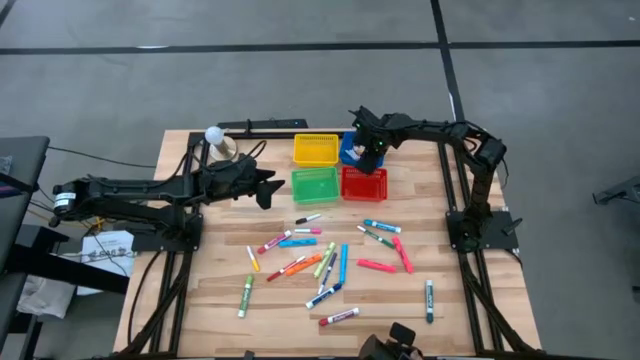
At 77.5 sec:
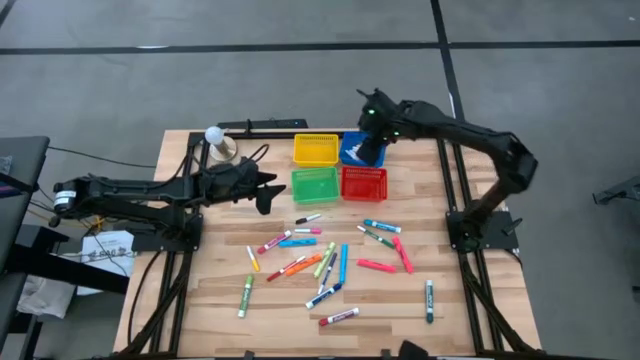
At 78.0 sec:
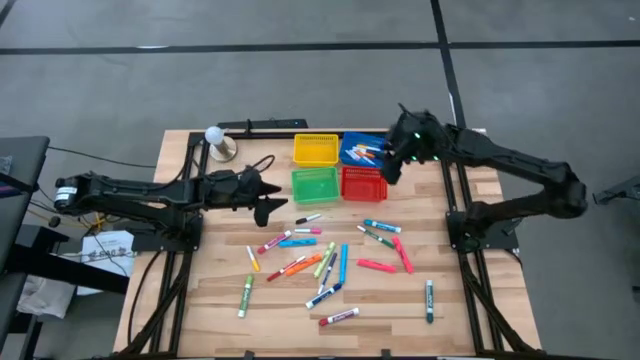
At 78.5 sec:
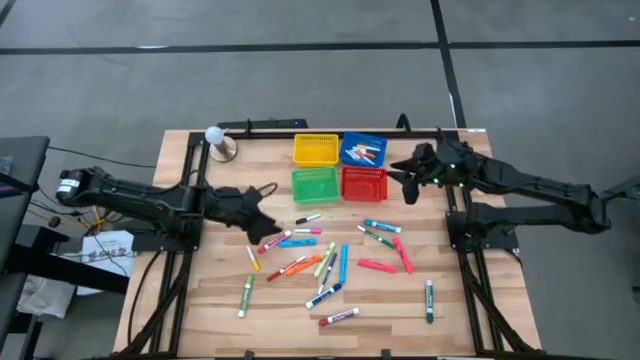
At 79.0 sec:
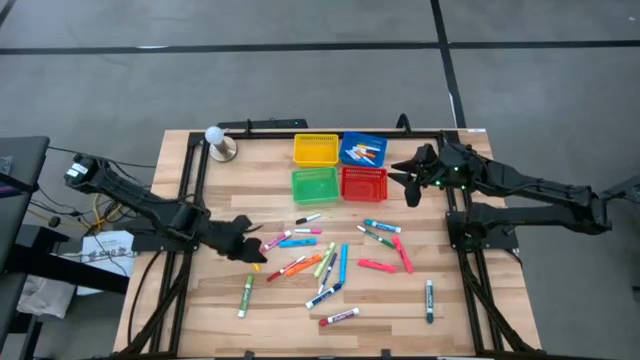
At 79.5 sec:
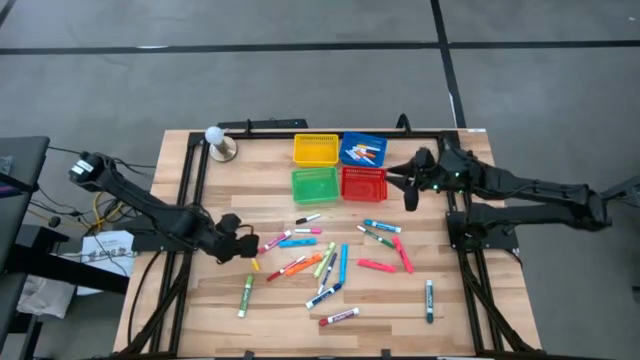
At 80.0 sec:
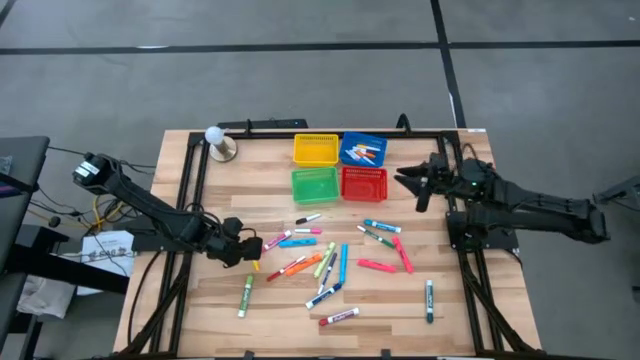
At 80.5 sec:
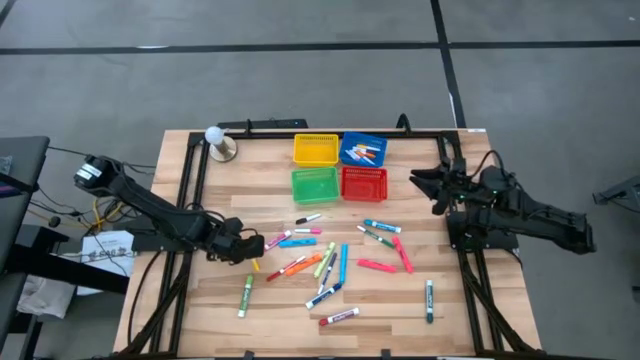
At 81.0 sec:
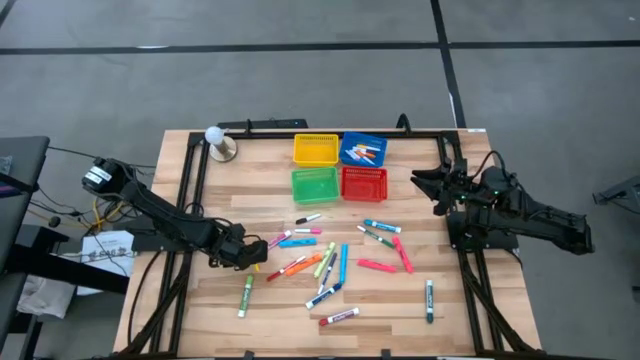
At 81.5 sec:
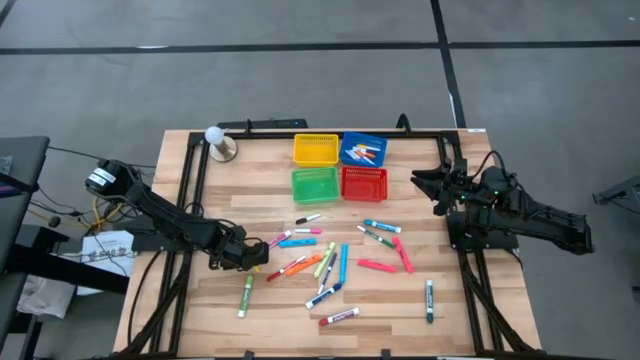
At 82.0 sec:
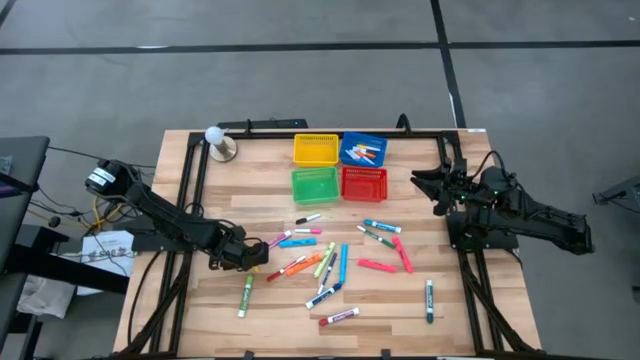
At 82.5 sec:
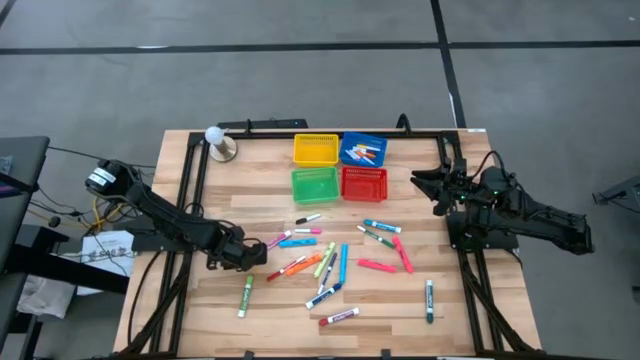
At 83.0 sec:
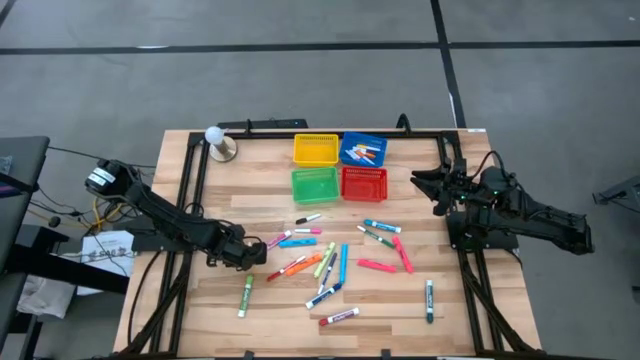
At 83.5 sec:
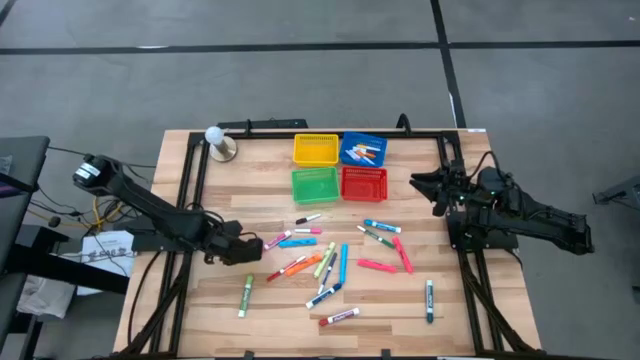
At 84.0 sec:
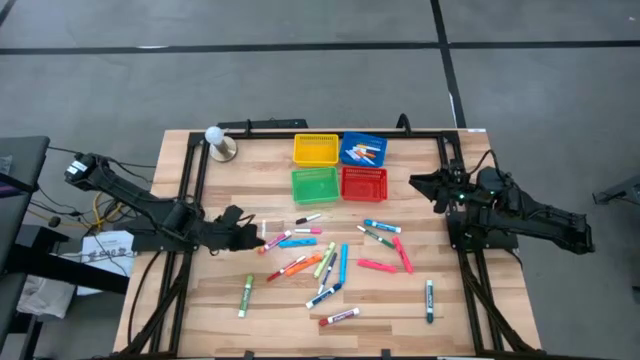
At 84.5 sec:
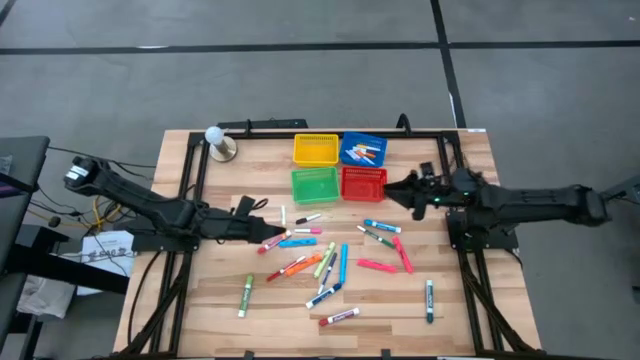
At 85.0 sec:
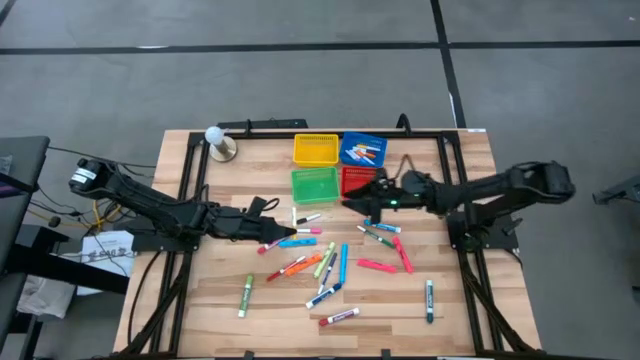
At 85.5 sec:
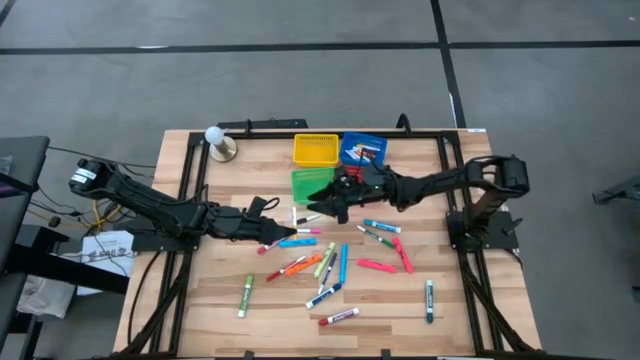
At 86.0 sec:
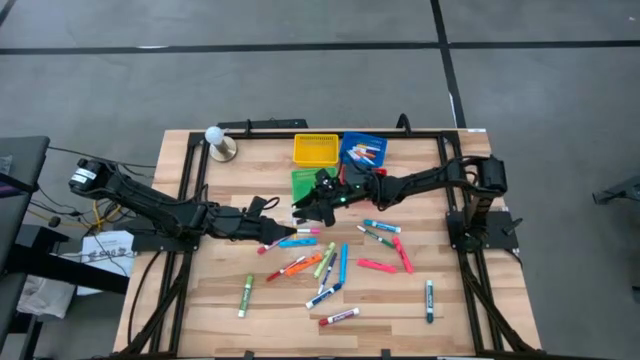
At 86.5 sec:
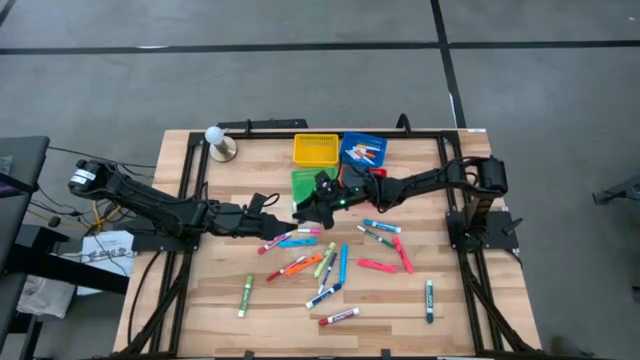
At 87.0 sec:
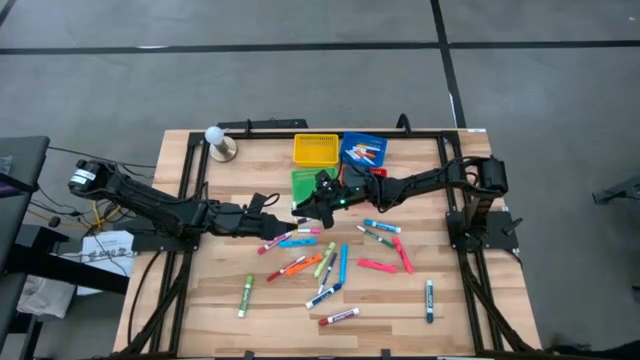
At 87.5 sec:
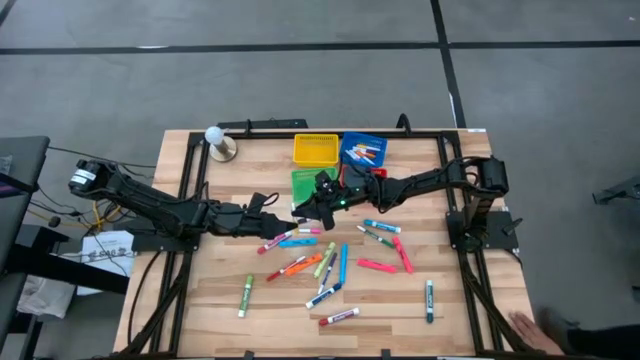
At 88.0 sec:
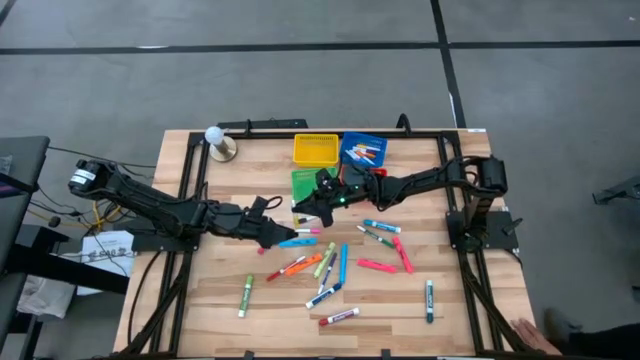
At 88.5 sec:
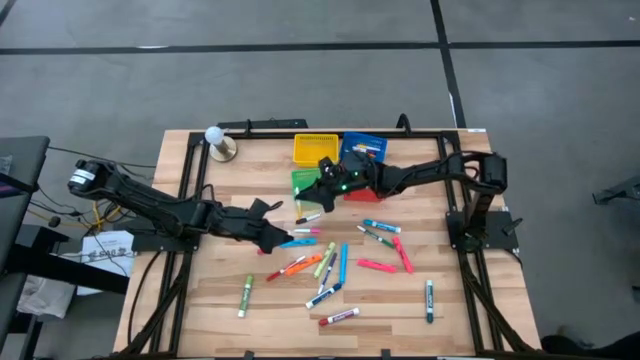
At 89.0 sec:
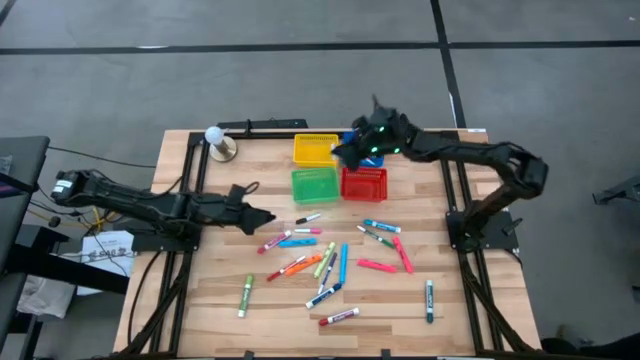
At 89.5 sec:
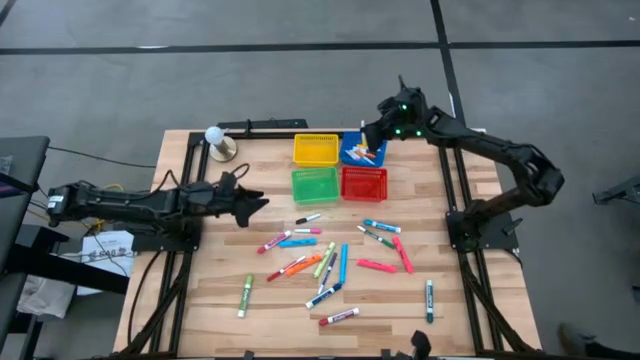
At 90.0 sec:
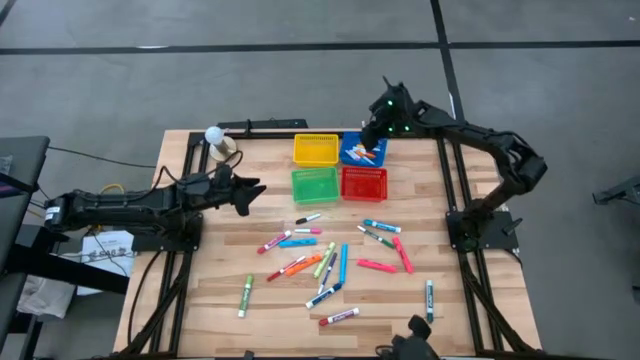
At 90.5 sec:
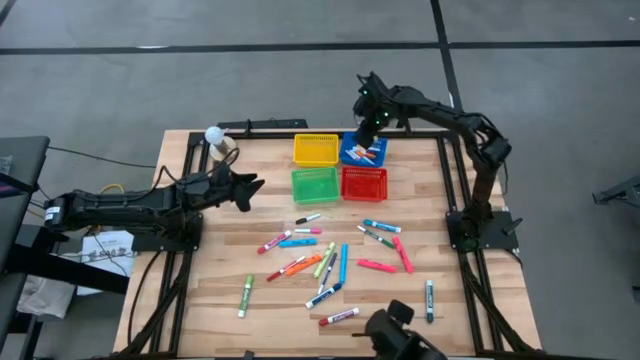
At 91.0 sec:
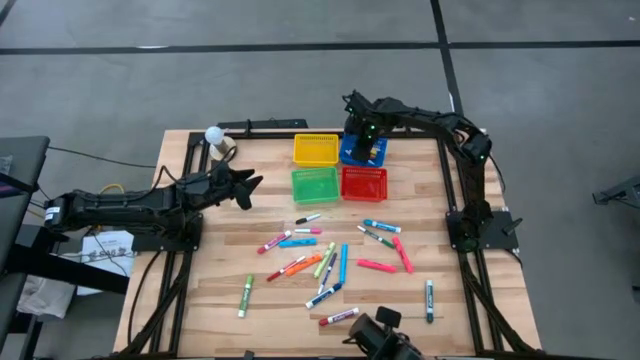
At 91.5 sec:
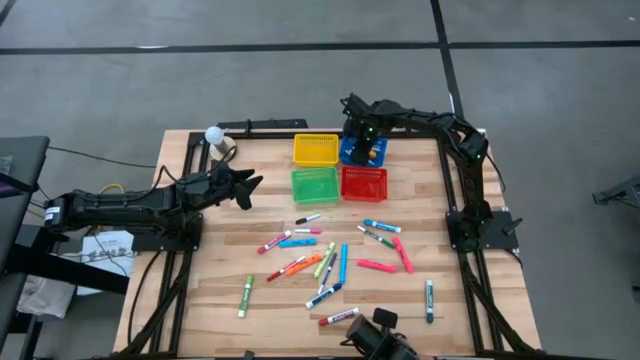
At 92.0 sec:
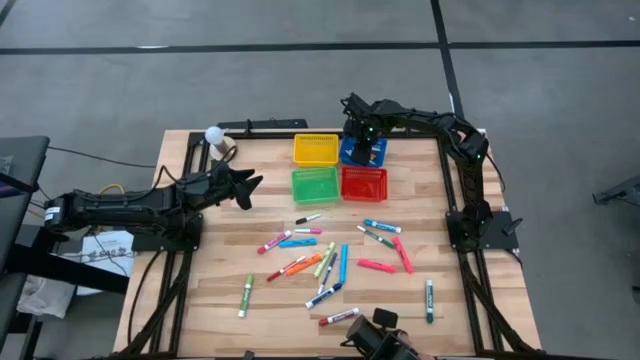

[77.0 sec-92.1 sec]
Task: Pick & Place Markers
Put the yellow mini marker into the blue bin

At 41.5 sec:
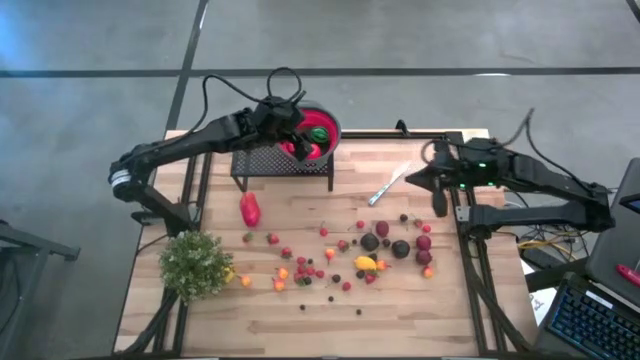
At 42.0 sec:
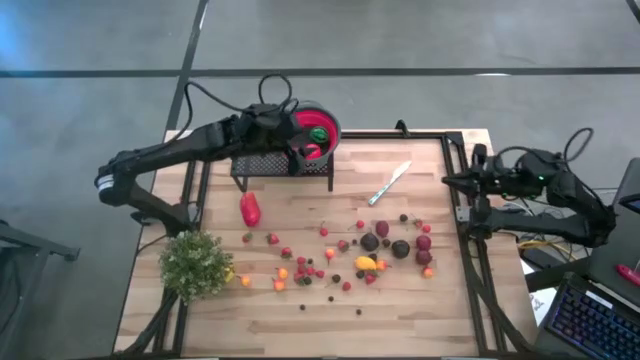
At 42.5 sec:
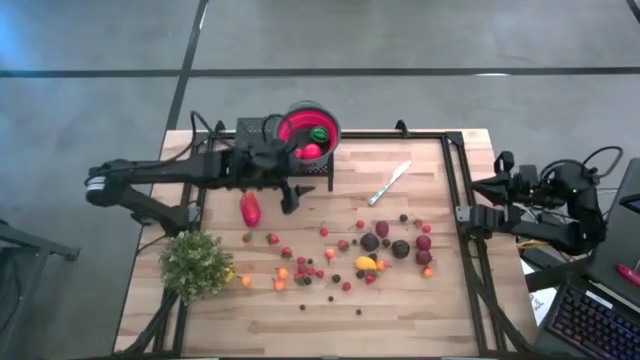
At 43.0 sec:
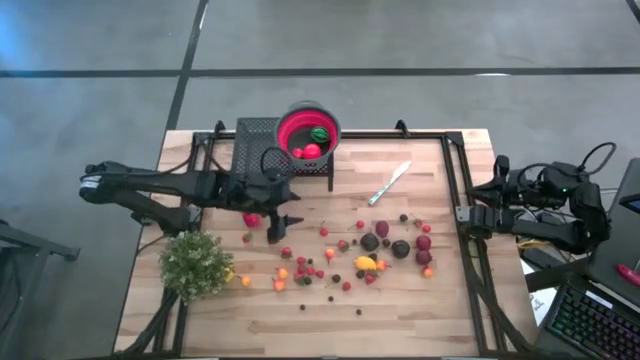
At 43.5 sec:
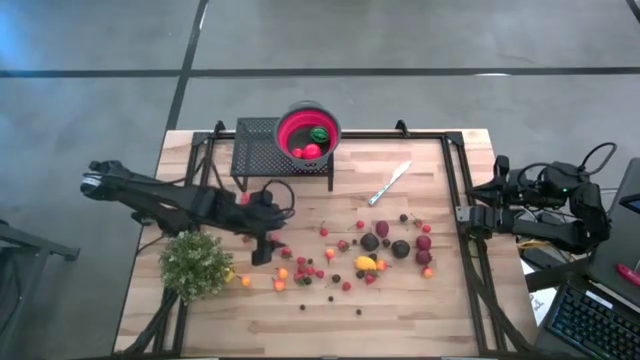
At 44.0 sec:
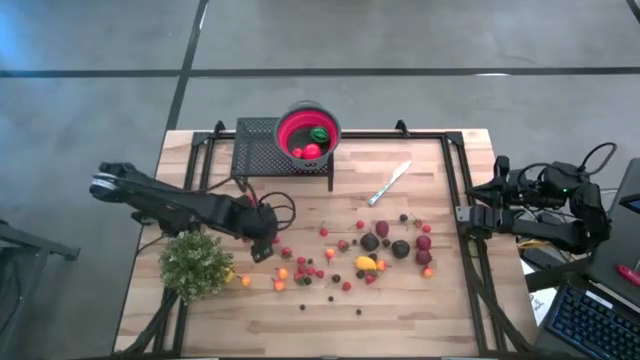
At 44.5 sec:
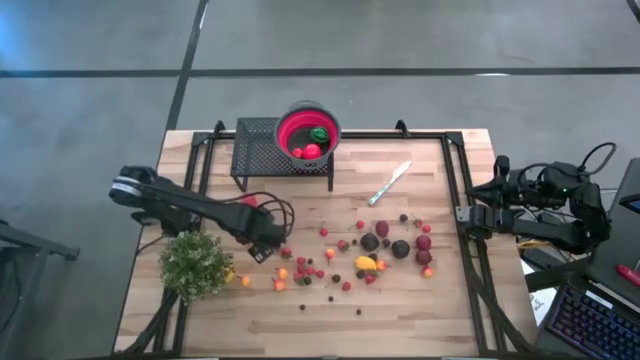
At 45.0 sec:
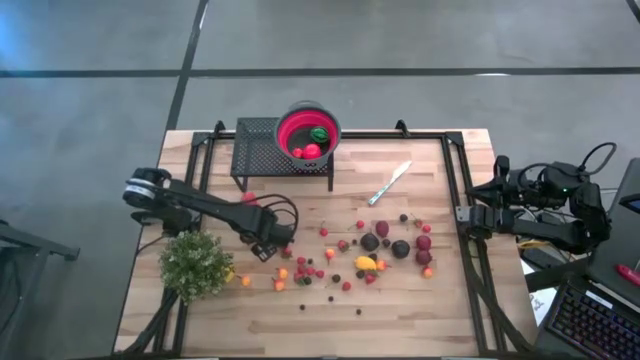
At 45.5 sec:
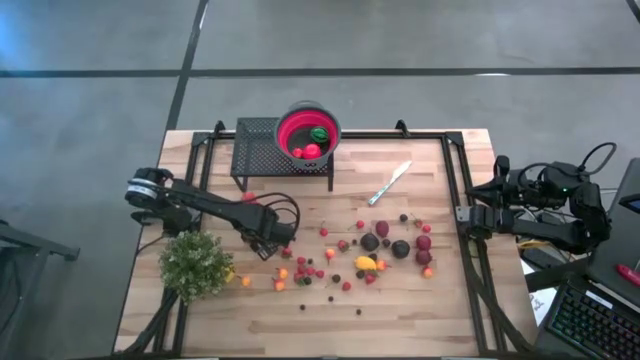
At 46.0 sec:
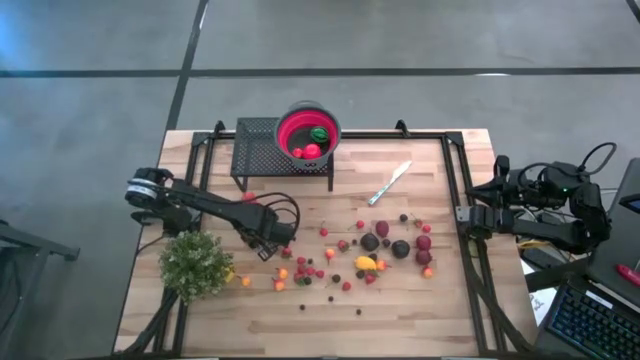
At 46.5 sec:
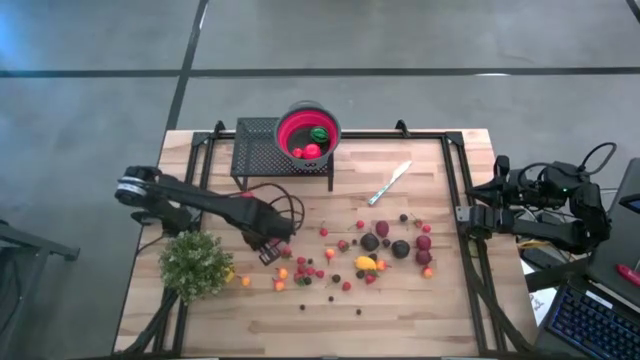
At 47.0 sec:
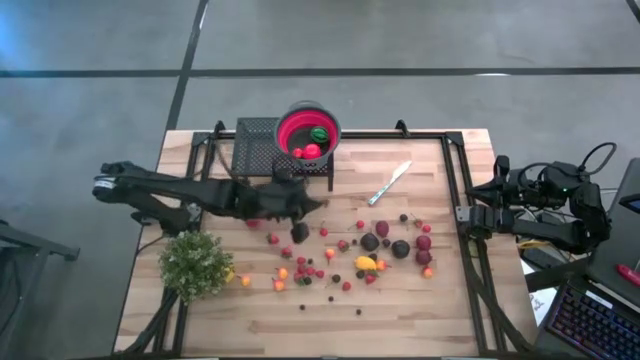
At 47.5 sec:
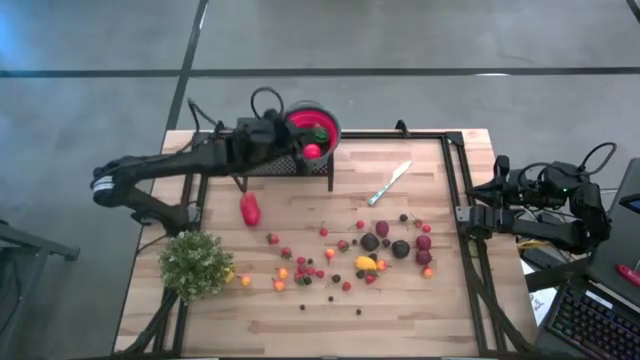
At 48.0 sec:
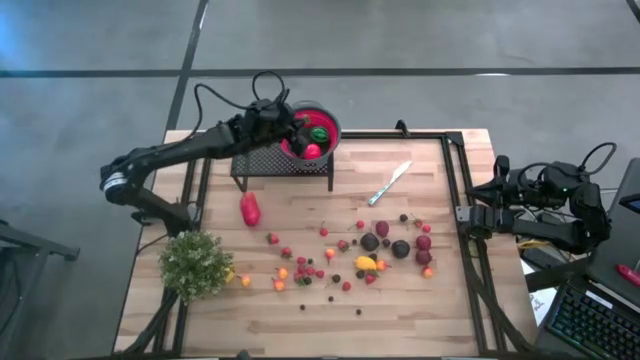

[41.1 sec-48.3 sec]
Task: Pick & Place Fruit
Put the red strawberry into the red gray strainer bowl on the shelf
